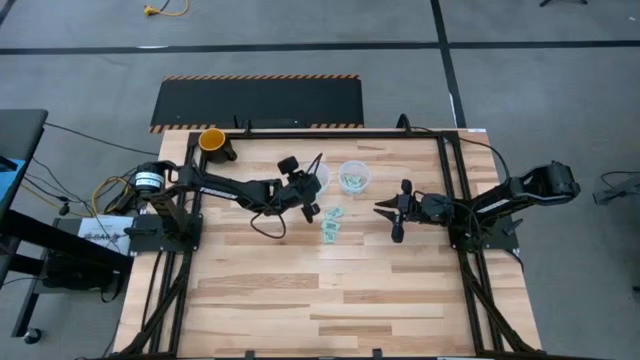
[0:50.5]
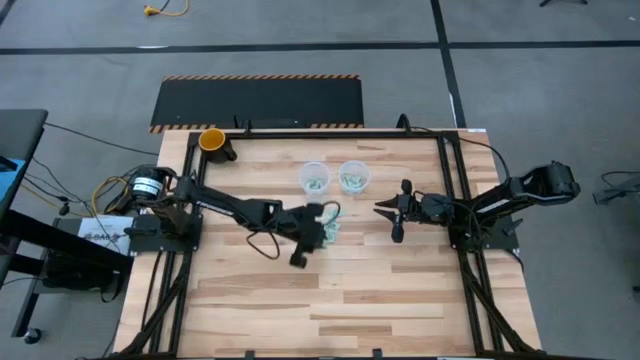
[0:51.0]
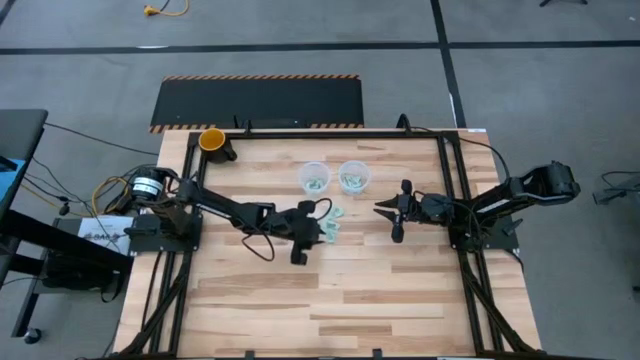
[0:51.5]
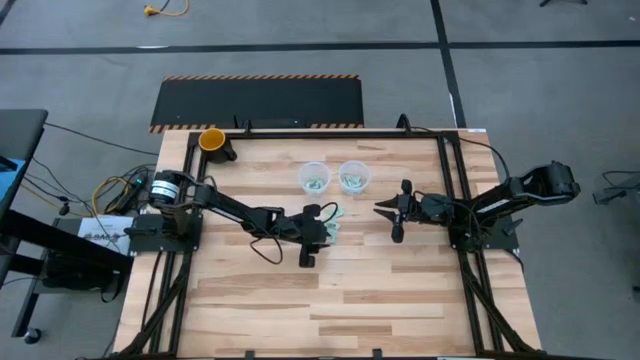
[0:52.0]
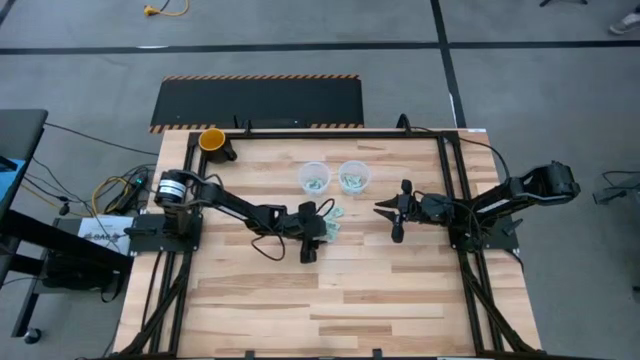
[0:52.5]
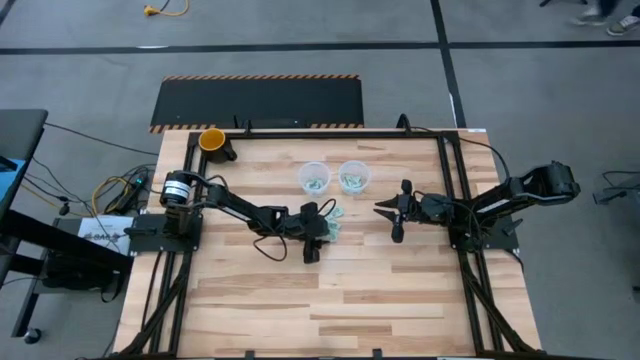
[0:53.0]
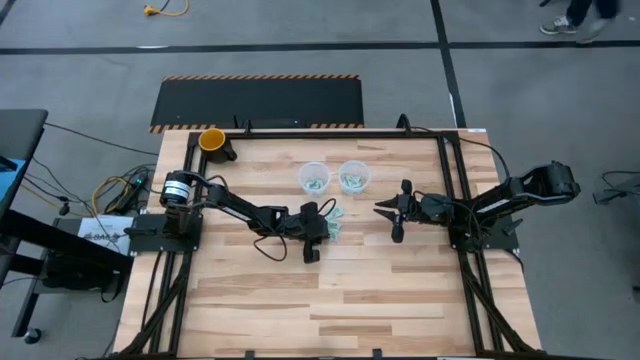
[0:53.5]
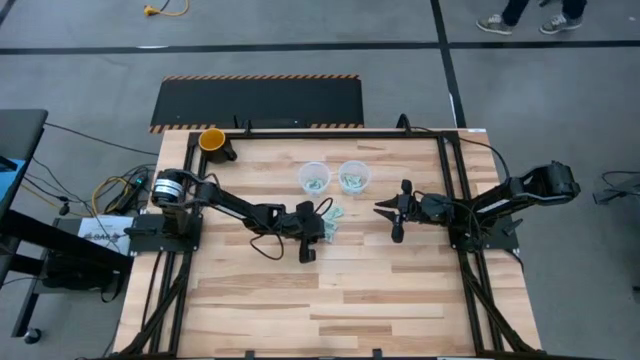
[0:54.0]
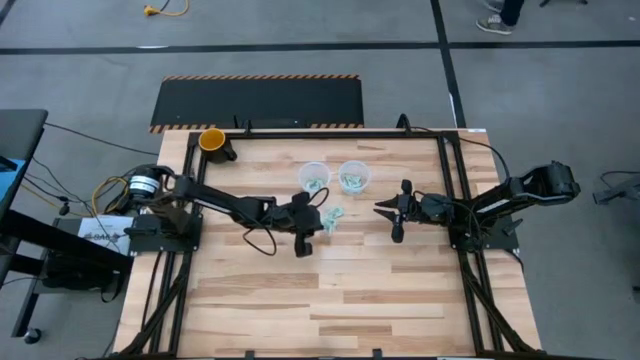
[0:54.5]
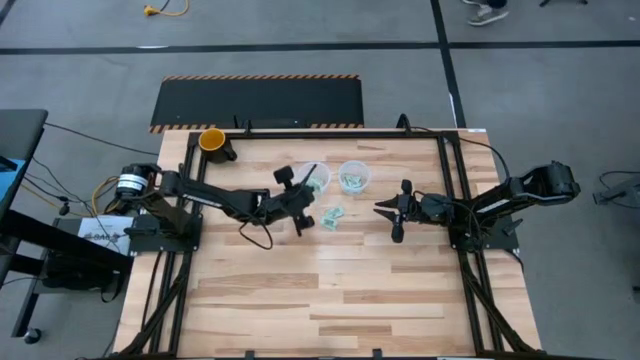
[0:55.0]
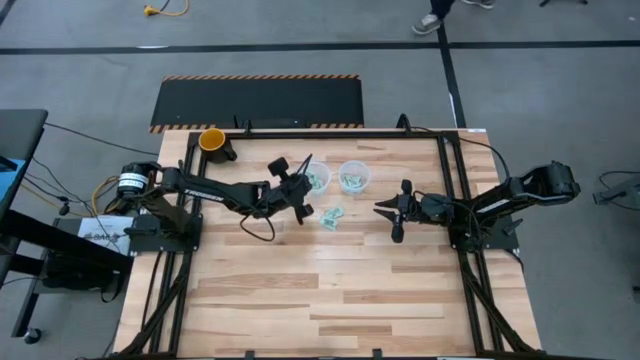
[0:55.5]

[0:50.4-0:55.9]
Task: Pick and place items into bin
Put the green stevia packet into the left transparent bin

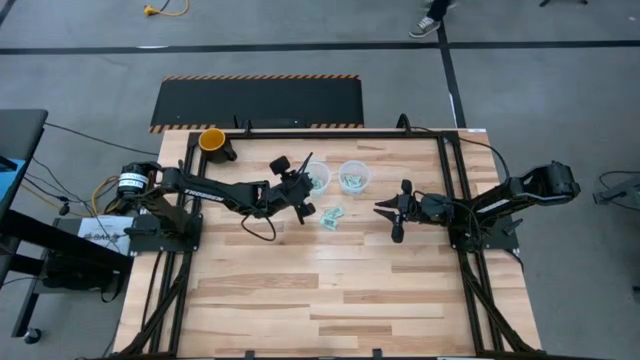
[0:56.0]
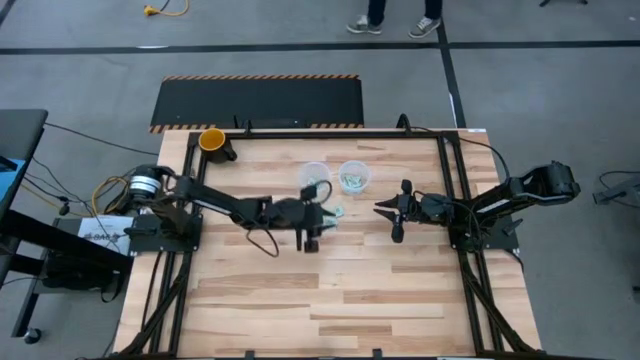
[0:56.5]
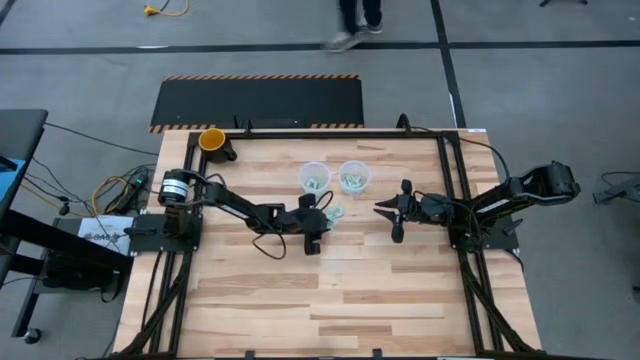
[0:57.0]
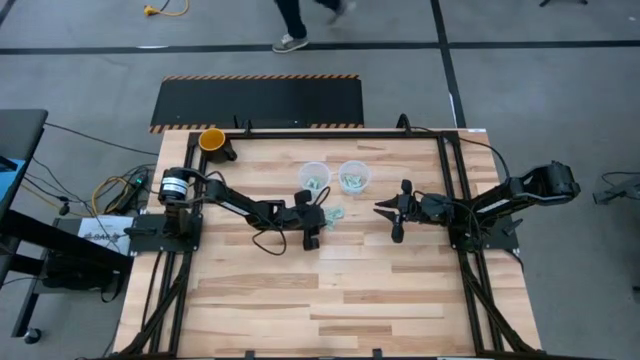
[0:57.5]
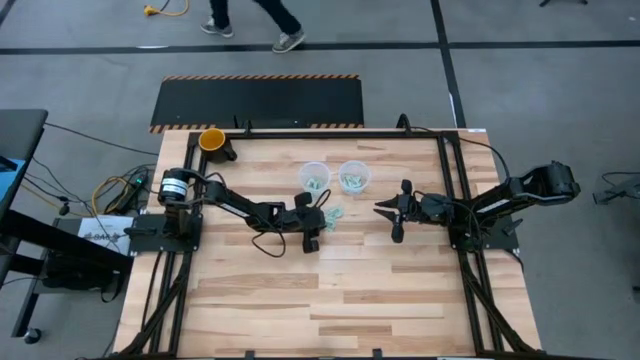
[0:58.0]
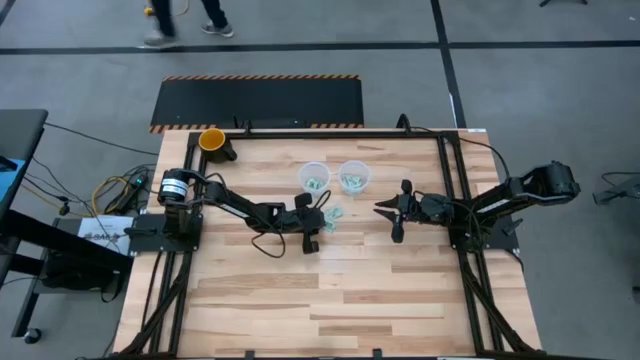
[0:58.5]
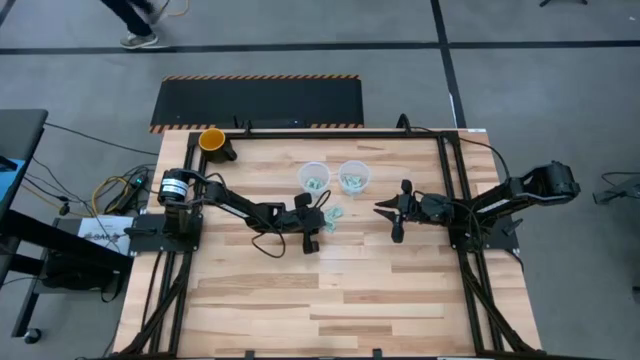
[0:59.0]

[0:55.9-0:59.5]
Put the green stevia packet into the left transparent bin

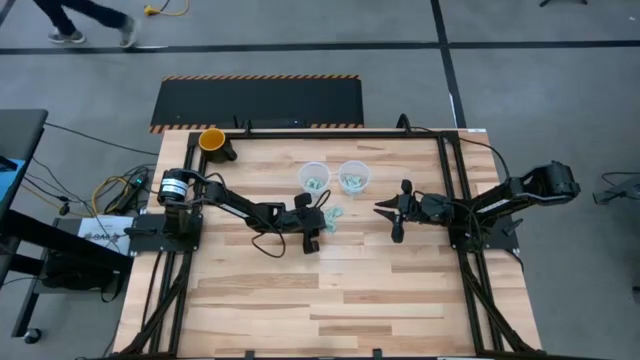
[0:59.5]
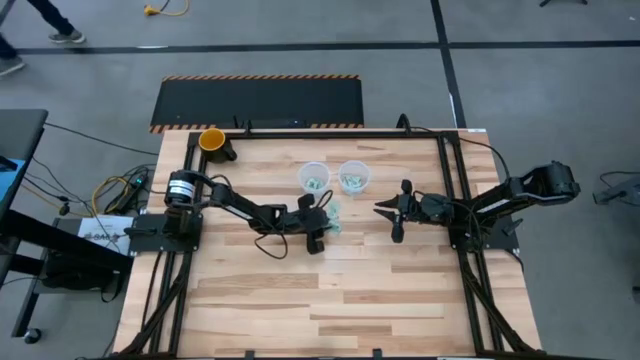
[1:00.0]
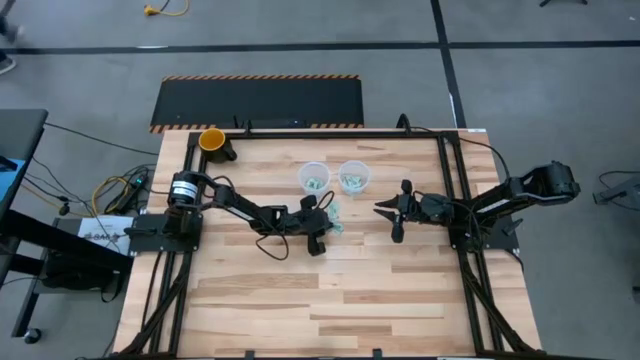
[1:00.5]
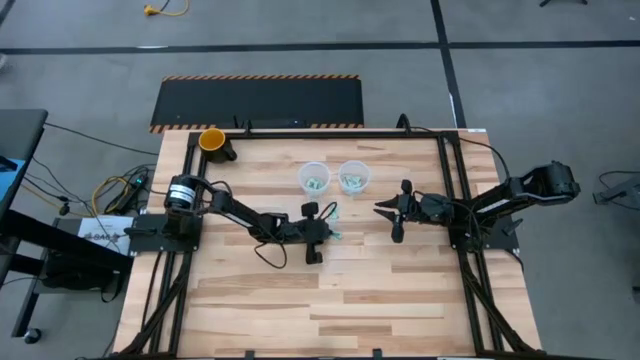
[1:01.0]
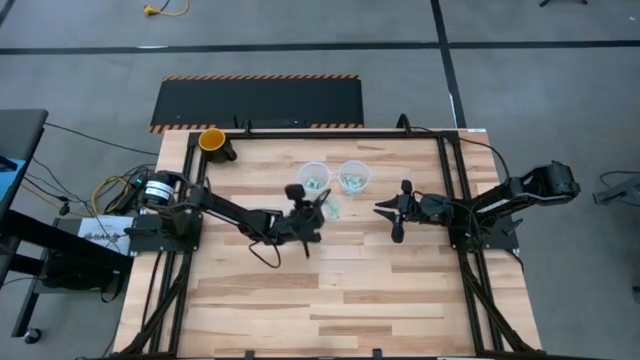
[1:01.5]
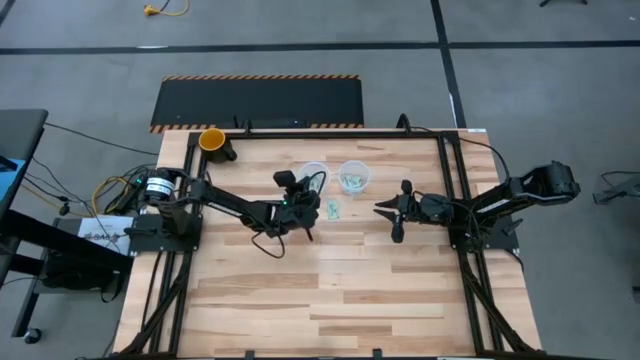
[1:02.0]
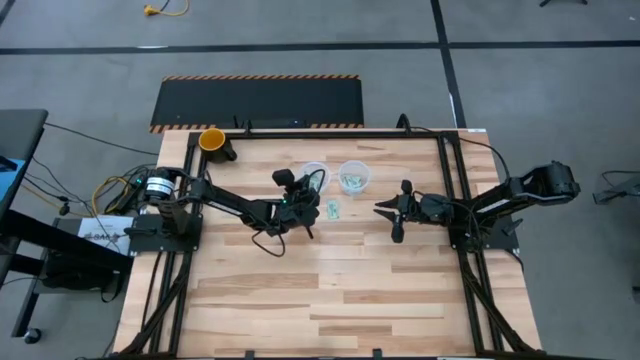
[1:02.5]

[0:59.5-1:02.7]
Put the green stevia packet into the left transparent bin

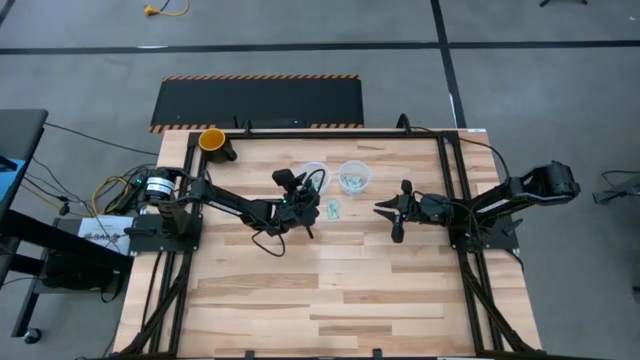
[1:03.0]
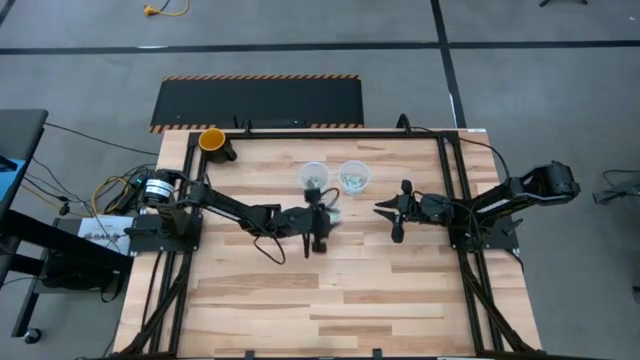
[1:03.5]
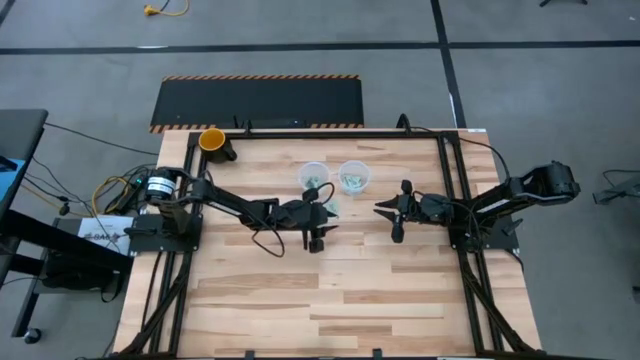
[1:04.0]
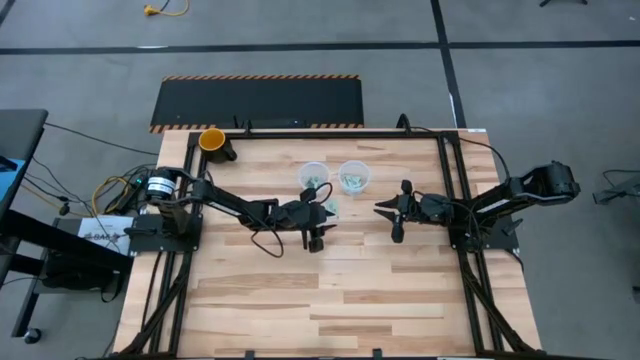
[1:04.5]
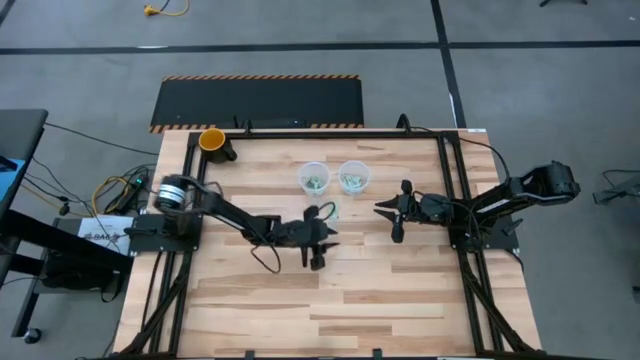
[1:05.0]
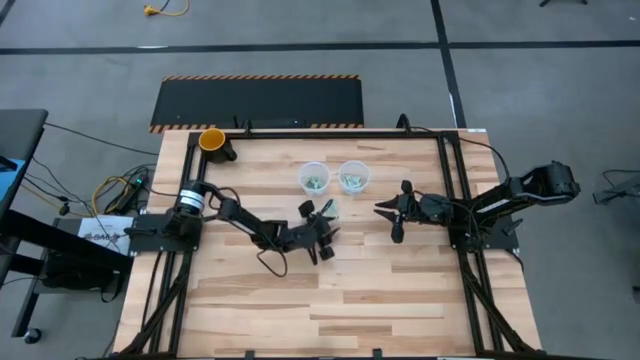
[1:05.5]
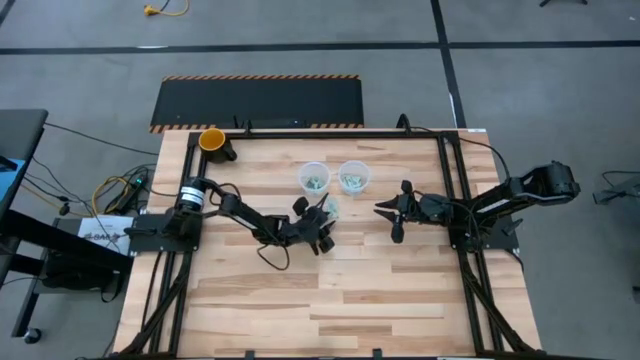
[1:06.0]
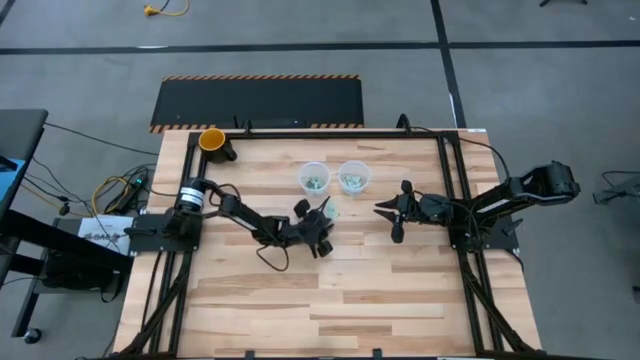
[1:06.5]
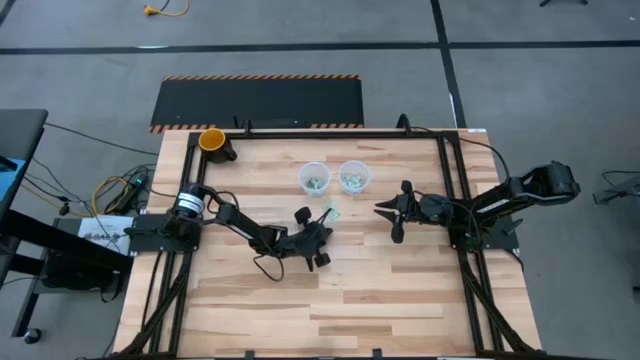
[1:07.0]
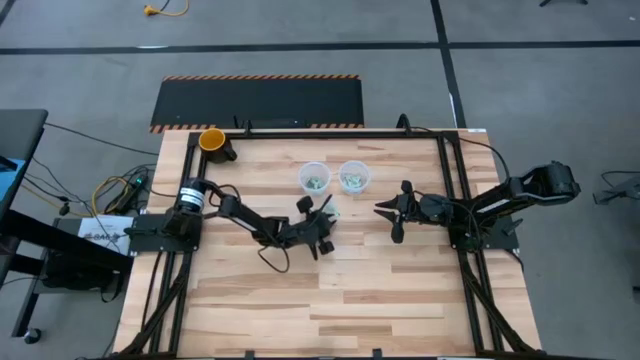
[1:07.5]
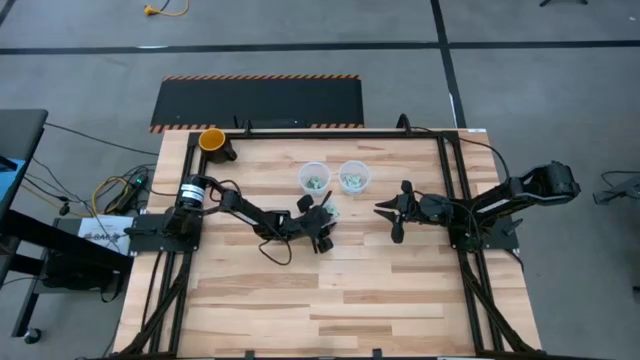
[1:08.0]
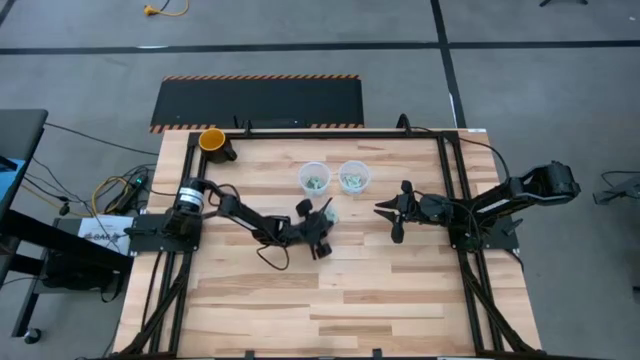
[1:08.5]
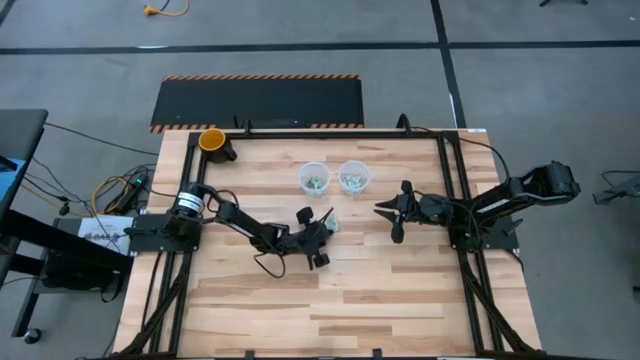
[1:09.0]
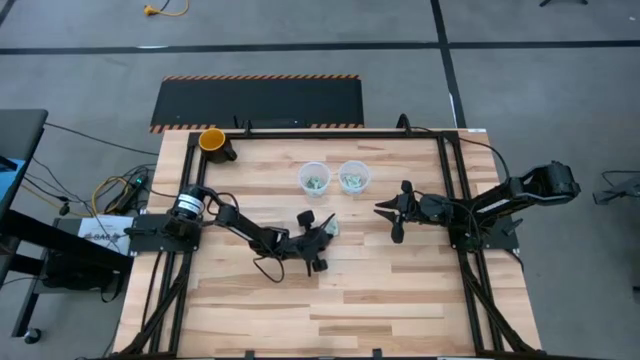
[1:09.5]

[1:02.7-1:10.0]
Put the green stevia packet into the left transparent bin

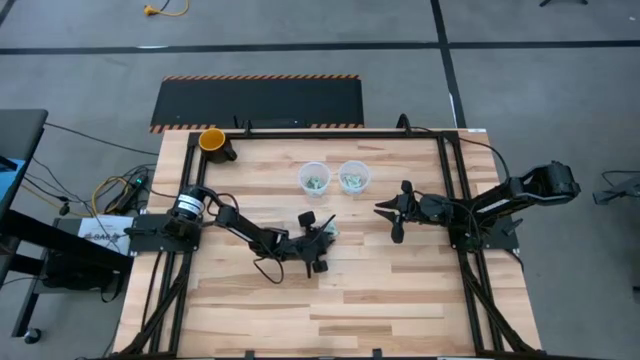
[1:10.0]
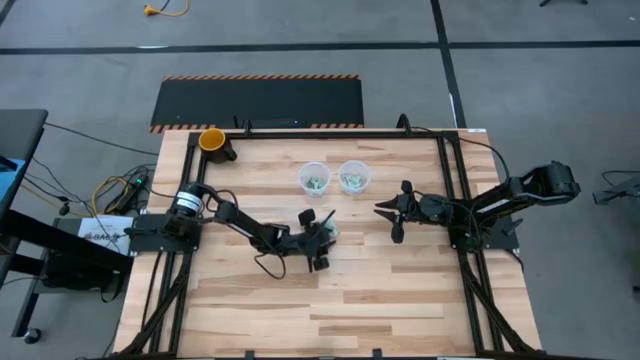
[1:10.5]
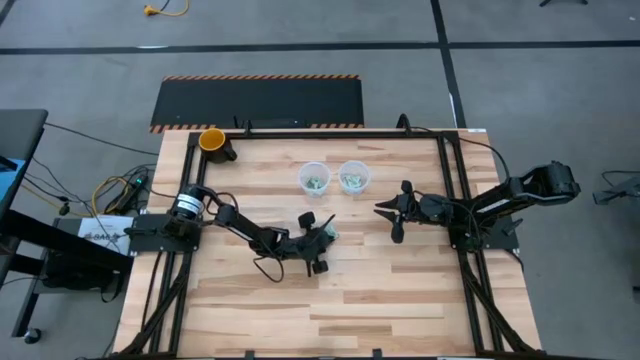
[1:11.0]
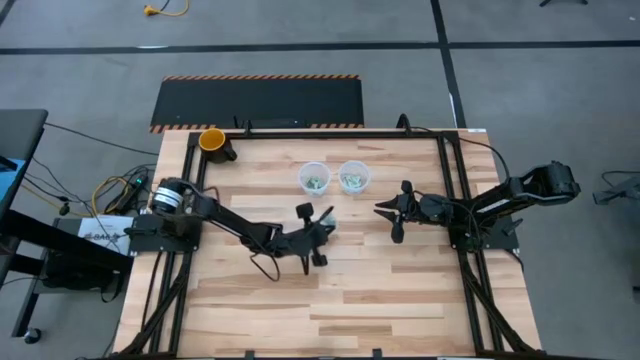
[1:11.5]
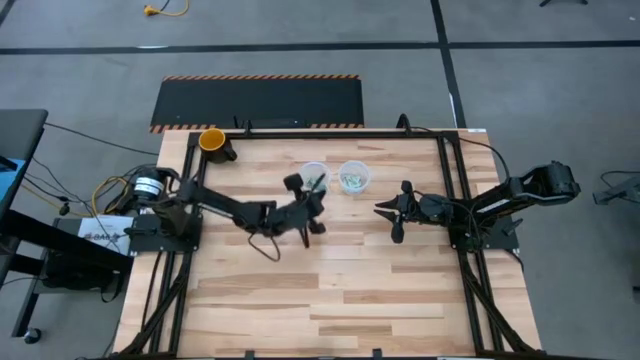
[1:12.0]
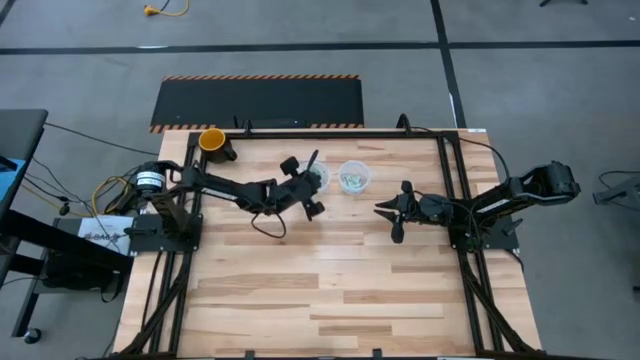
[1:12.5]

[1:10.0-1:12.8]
Put the green stevia packet into the left transparent bin
